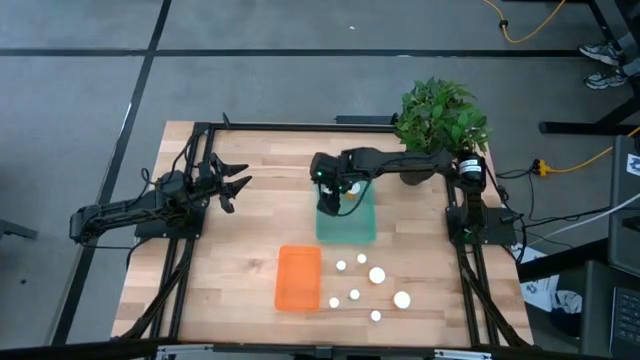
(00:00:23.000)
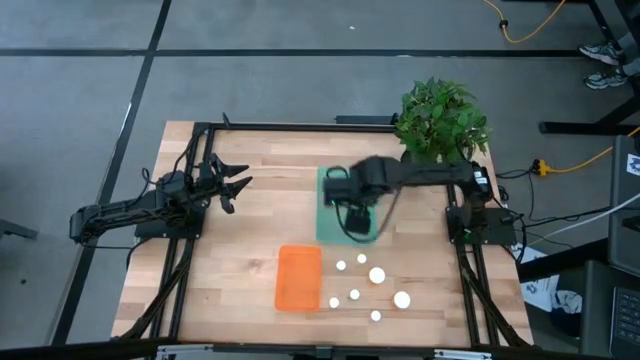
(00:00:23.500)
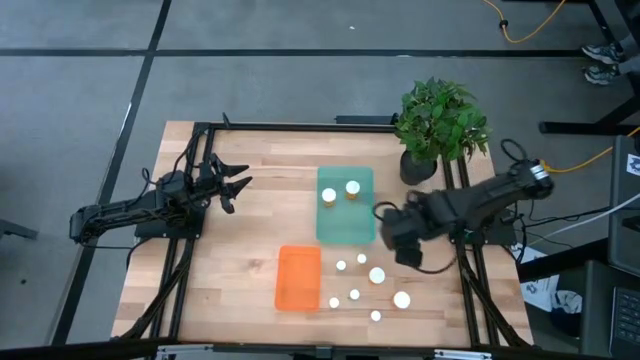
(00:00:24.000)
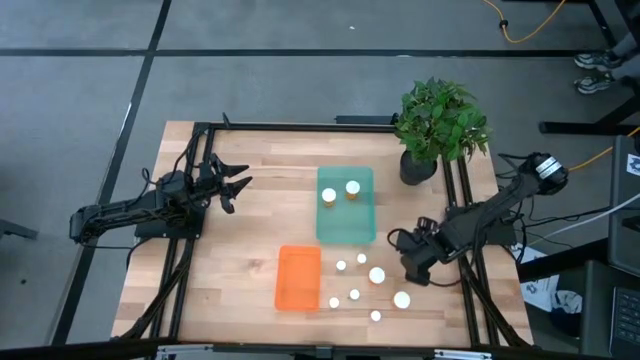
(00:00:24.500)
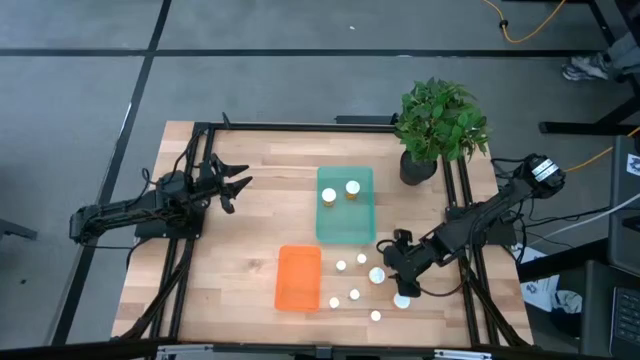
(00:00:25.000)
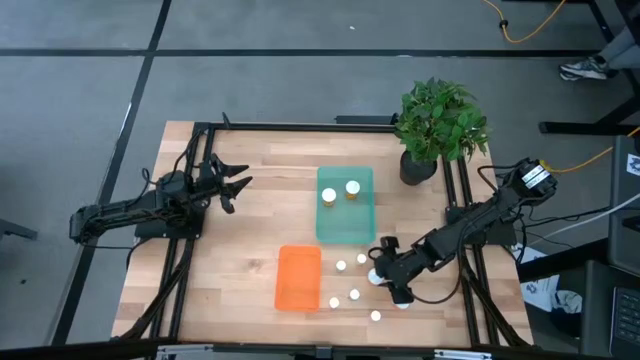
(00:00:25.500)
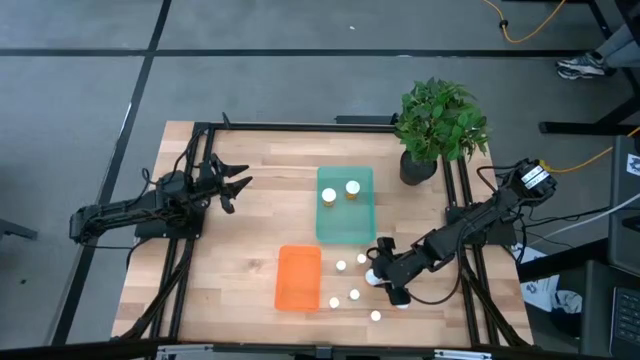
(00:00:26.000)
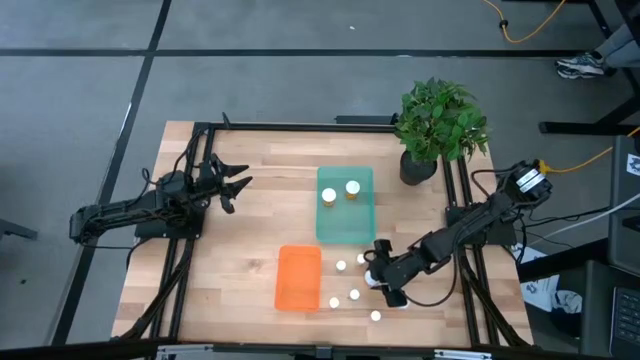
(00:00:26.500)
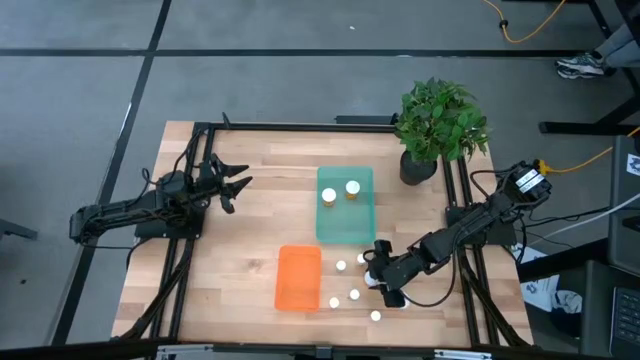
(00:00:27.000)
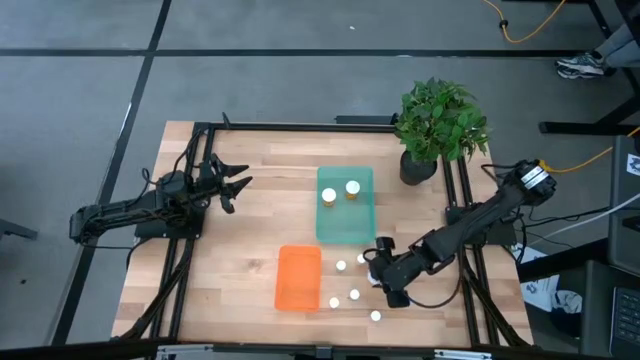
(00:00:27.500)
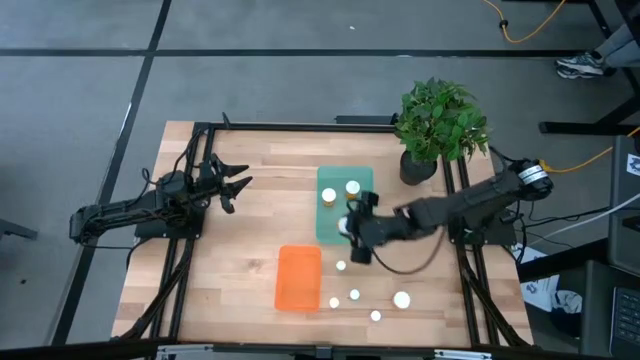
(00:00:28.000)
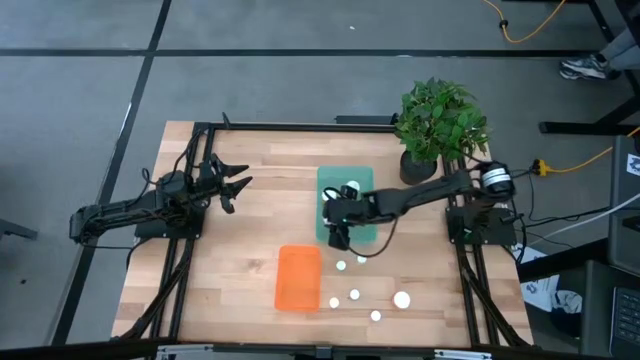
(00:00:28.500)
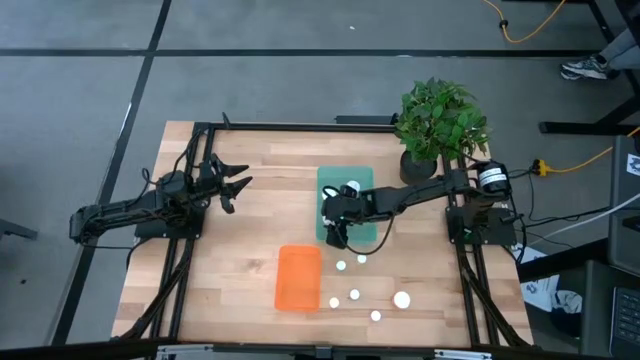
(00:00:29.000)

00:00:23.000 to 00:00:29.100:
Task: Pick and place medicine bottles into bin by pill shape (circle, oval)
Put the top big orange pill bottle into the green bin

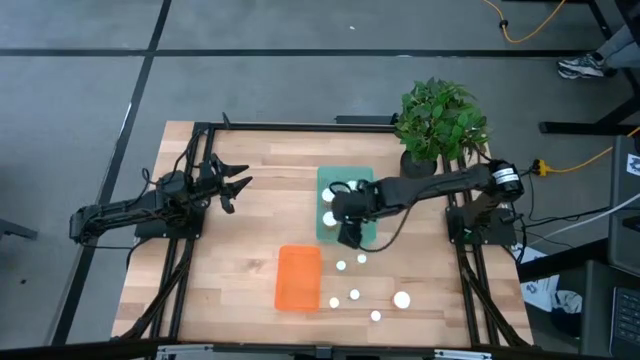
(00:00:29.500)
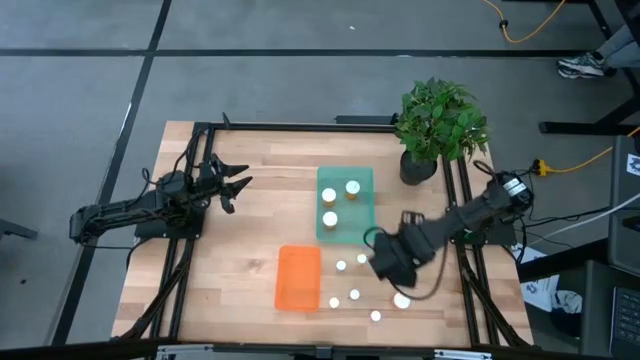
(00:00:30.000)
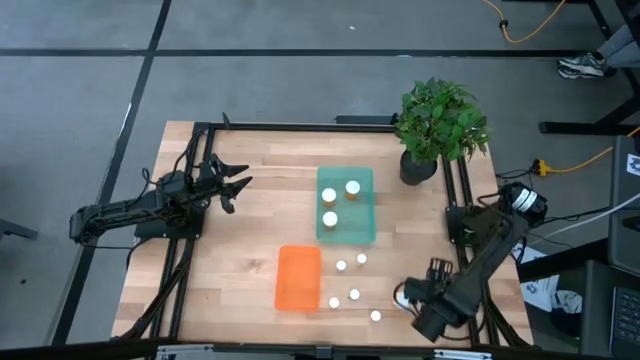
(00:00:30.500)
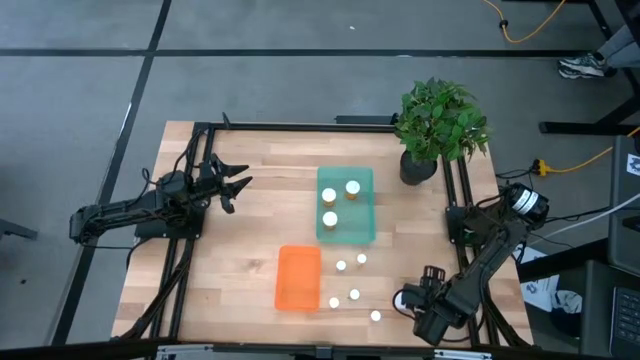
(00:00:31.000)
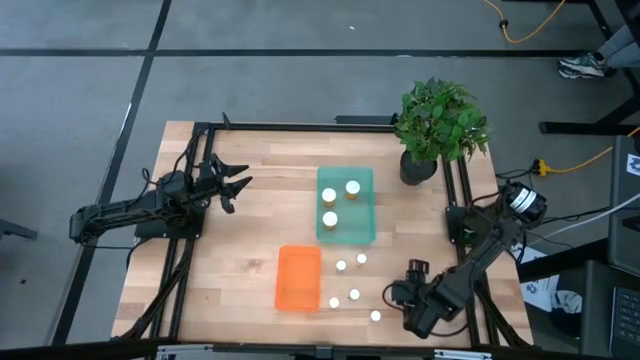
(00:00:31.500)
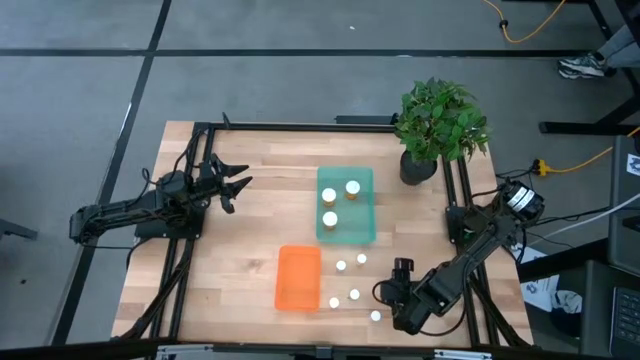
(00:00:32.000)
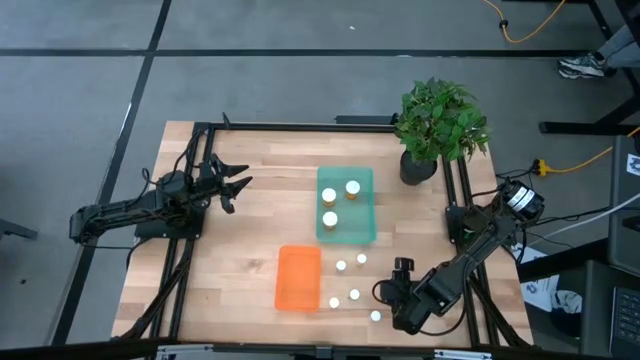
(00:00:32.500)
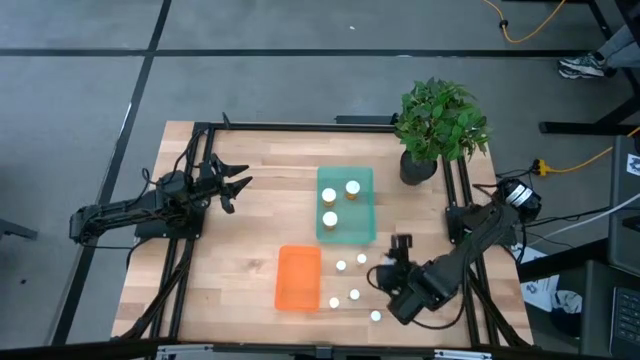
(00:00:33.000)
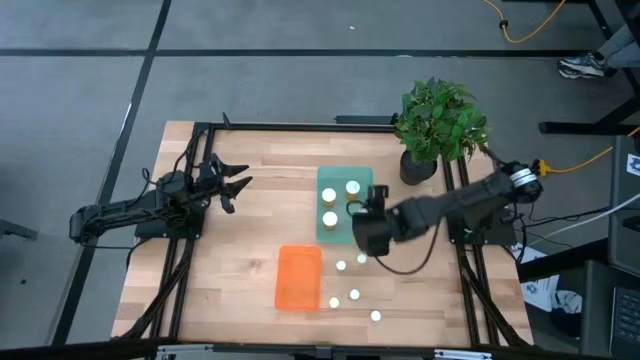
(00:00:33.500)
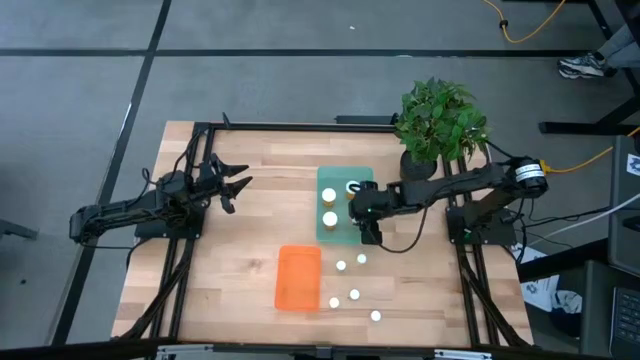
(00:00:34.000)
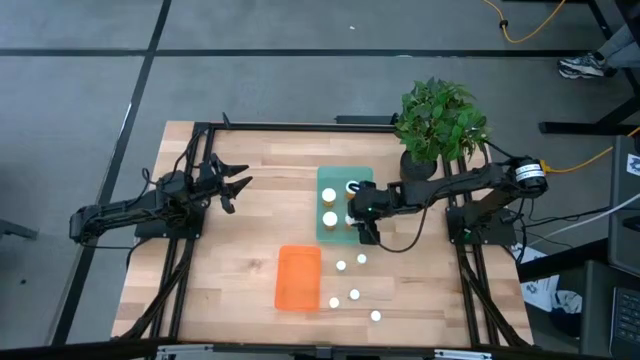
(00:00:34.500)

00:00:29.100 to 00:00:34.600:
Put the big orange pill bottle into the green bin

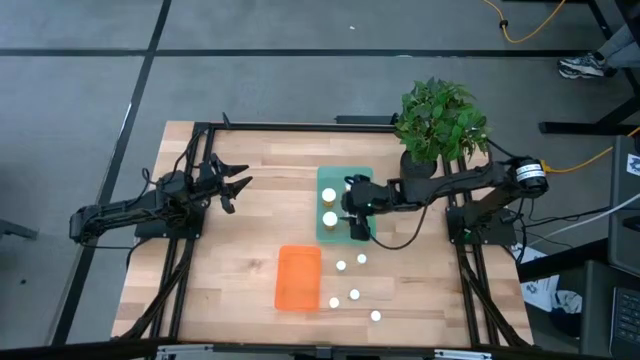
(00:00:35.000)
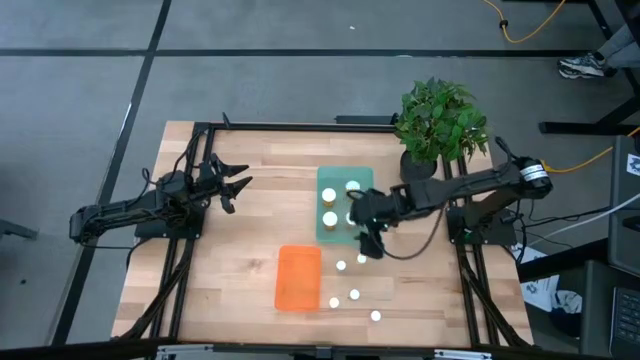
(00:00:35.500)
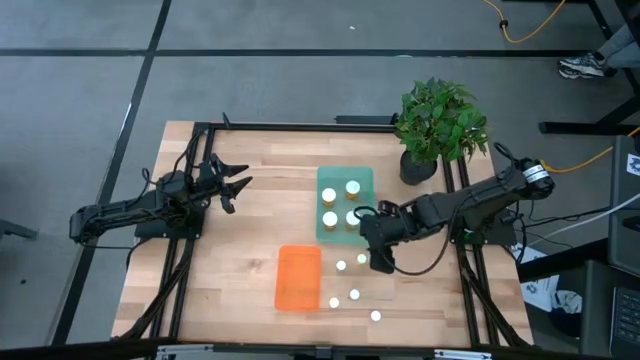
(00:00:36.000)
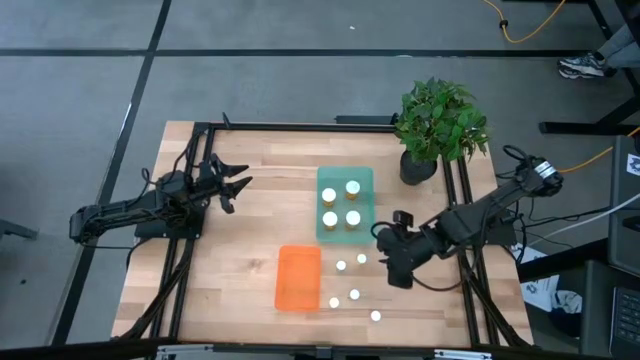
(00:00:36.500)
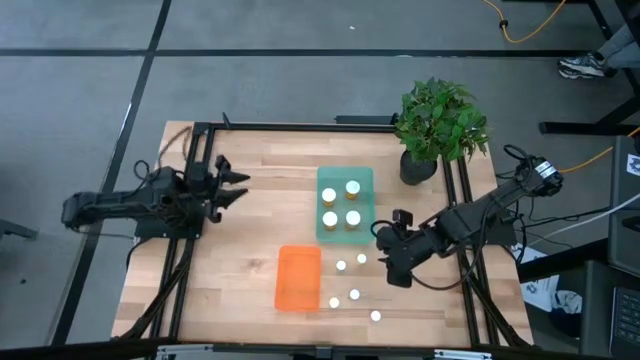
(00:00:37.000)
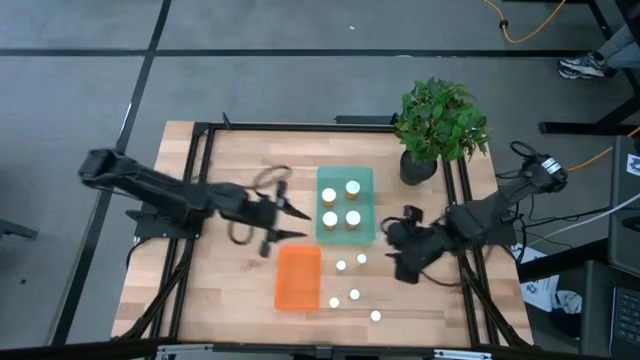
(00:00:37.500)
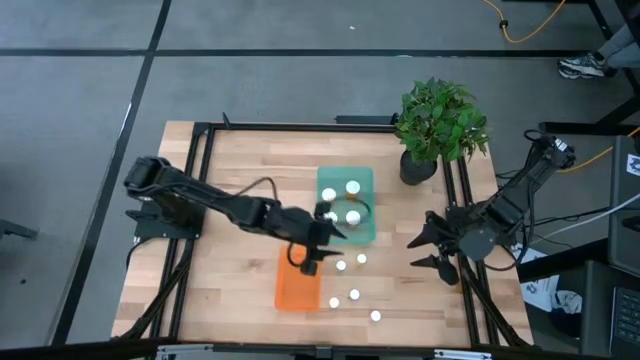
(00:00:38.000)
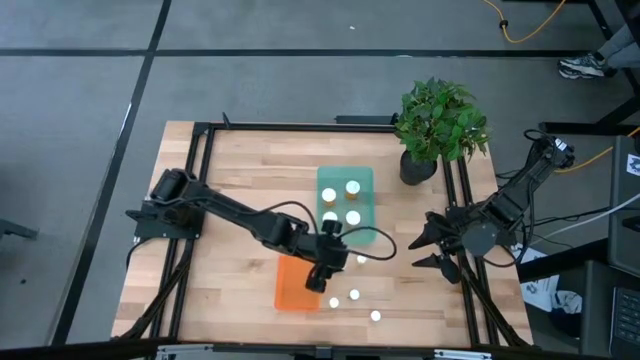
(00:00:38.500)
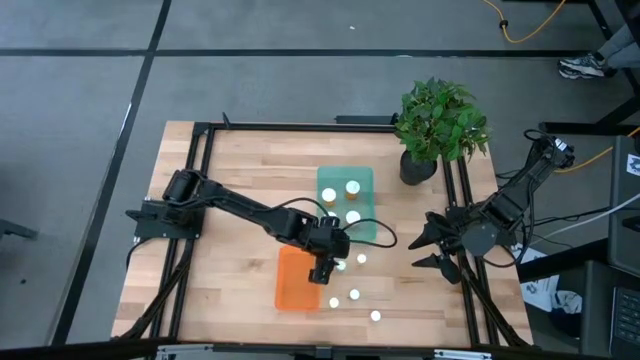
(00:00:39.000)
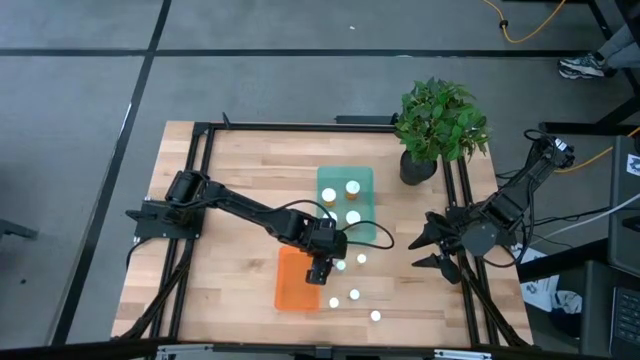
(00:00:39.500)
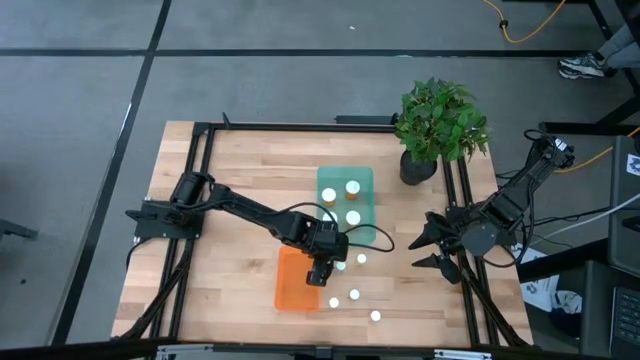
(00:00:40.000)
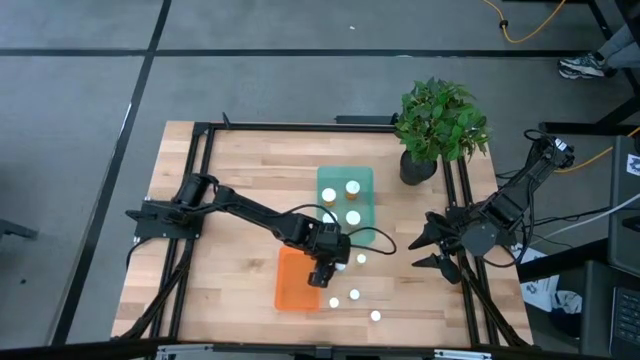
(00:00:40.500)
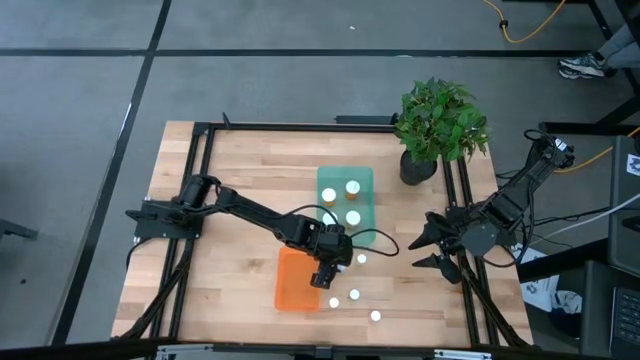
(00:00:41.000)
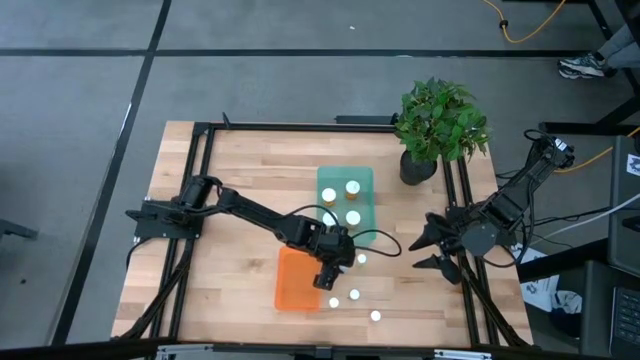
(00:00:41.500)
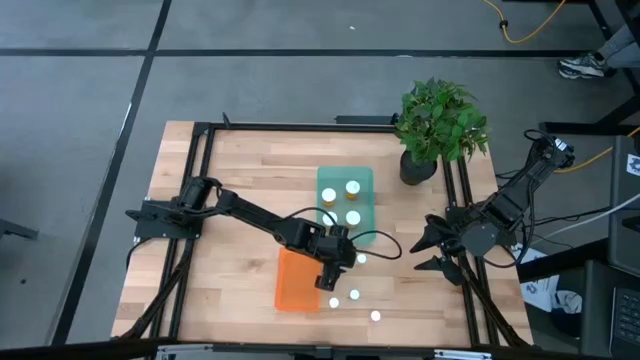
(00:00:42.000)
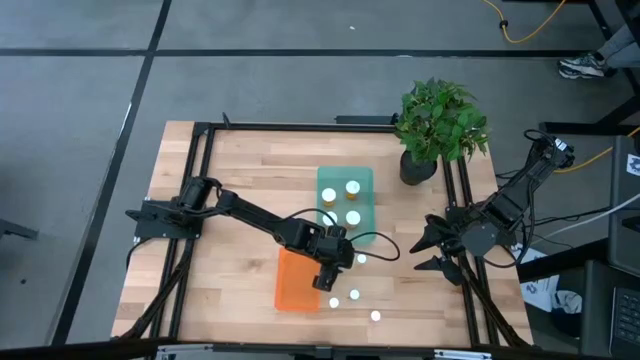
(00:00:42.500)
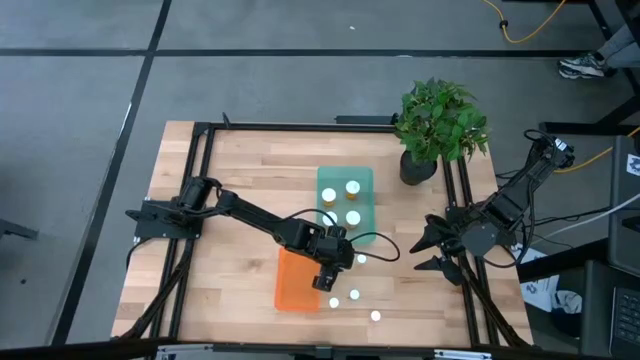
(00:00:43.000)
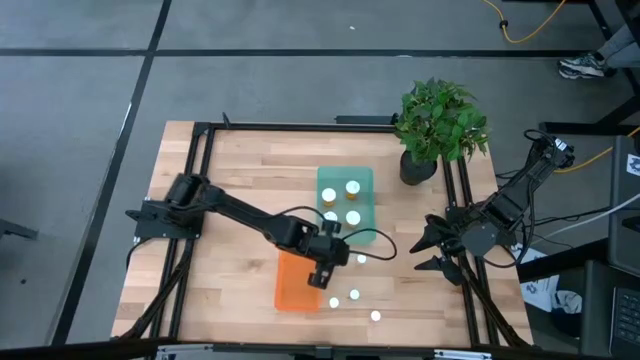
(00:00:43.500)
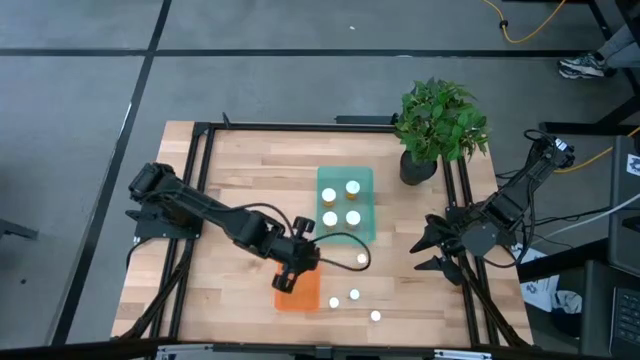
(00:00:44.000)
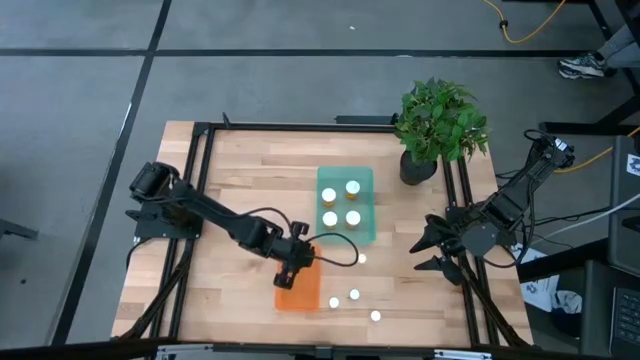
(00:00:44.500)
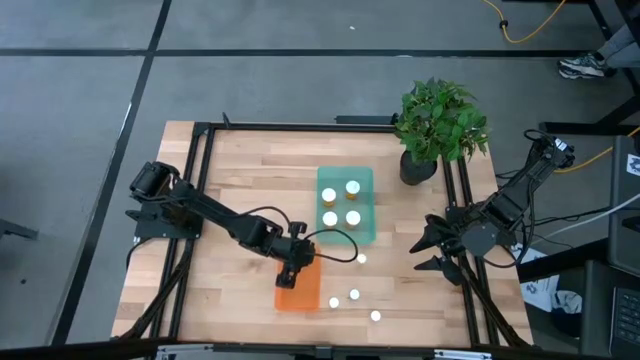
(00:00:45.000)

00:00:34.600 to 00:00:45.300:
Put the top small blue pill bottle into the orange bin
